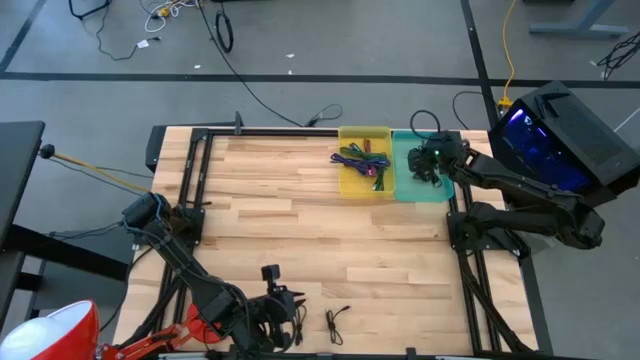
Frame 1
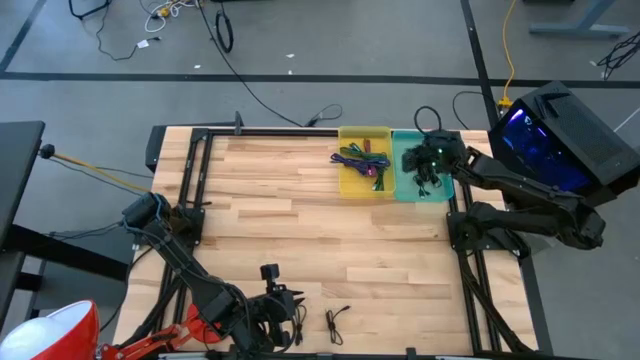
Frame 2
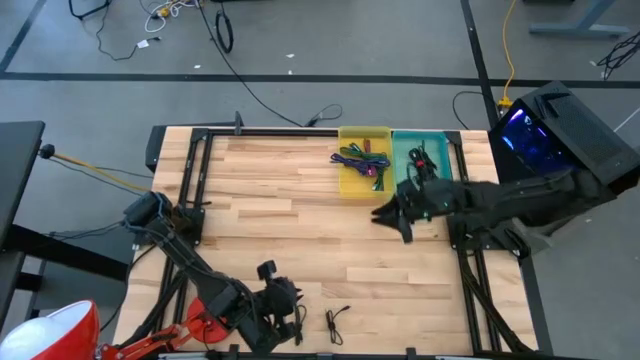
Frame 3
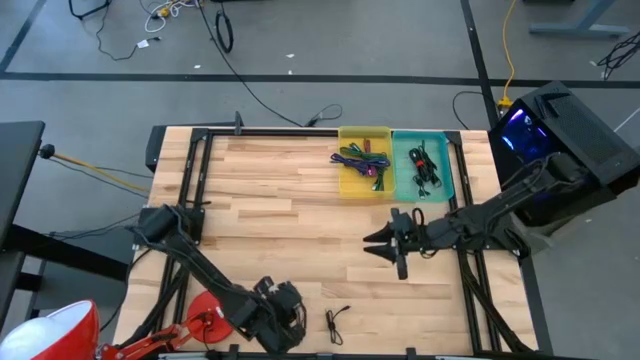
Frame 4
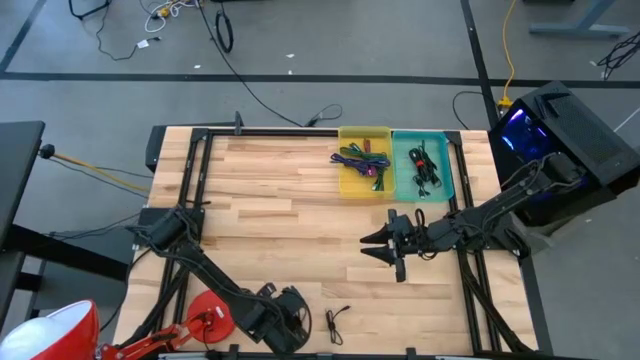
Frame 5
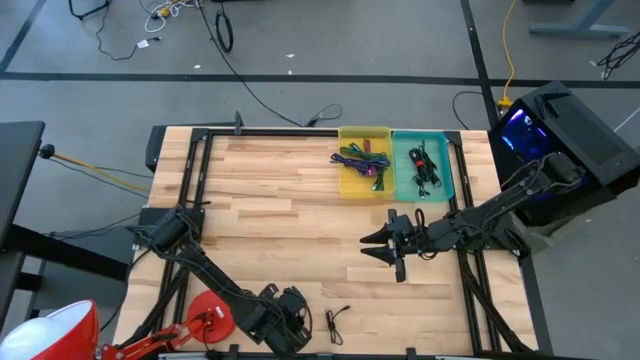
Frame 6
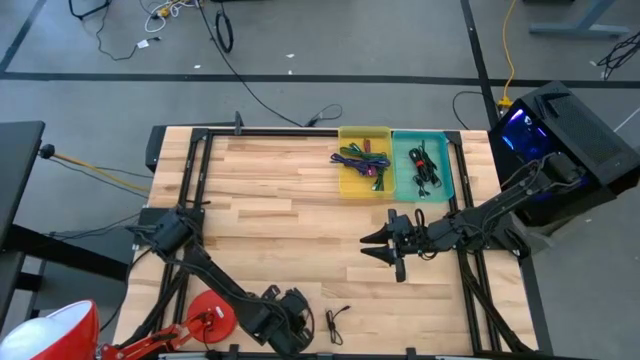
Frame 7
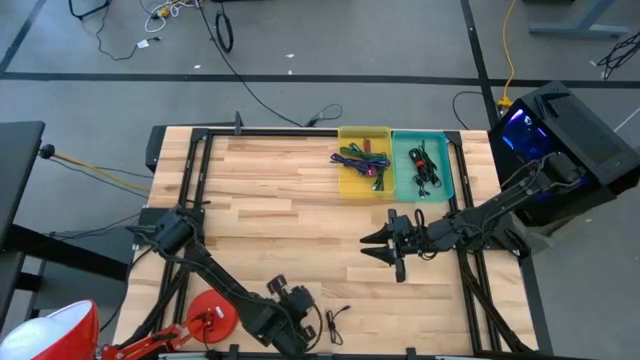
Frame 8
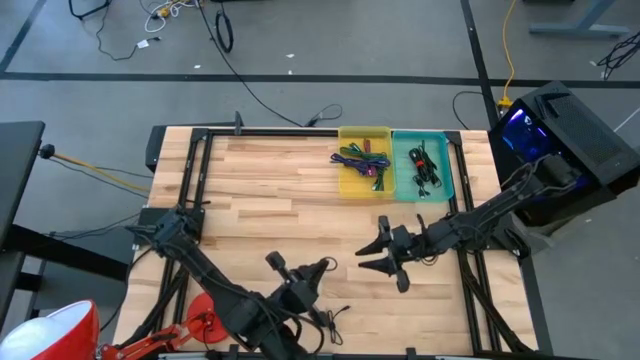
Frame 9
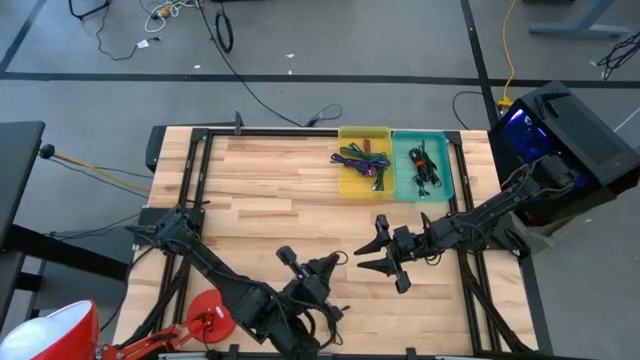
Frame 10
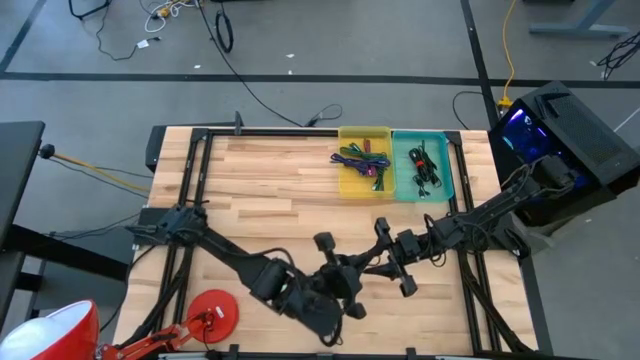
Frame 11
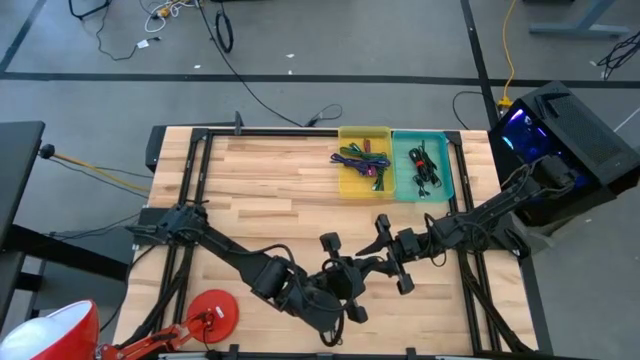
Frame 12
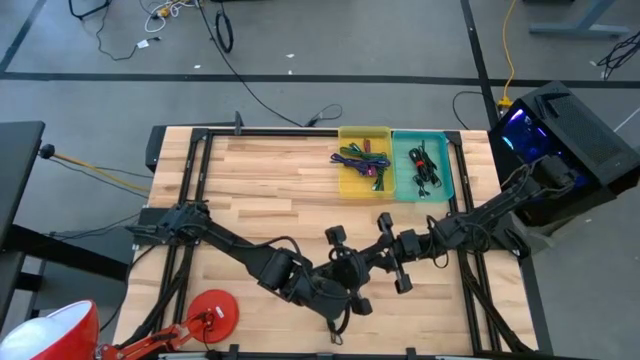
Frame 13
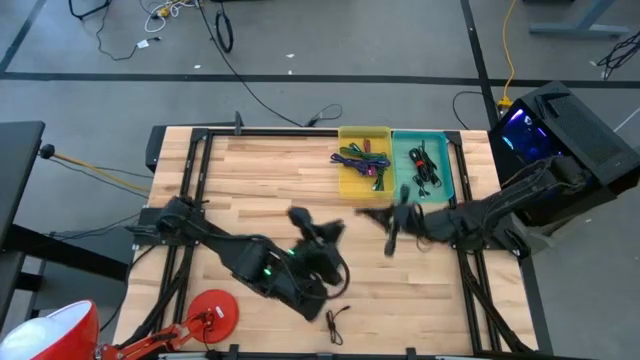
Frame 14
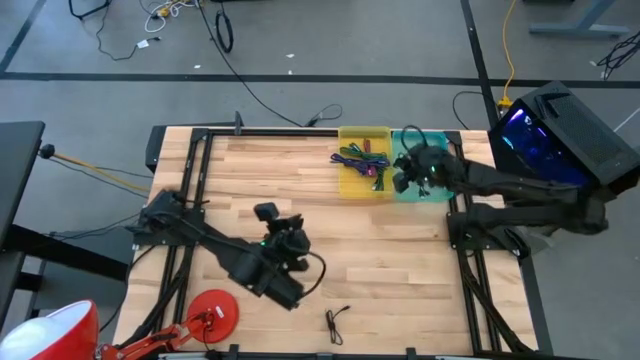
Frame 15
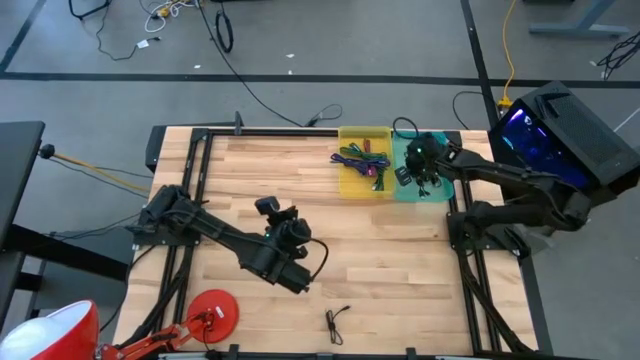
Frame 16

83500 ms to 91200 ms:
Task: Pick & Place USB Port
Put the black charger cable into the blue bin

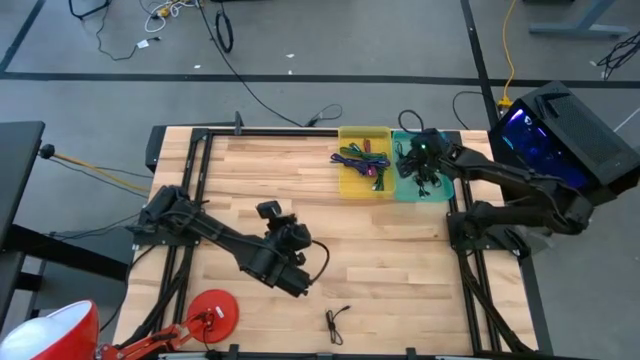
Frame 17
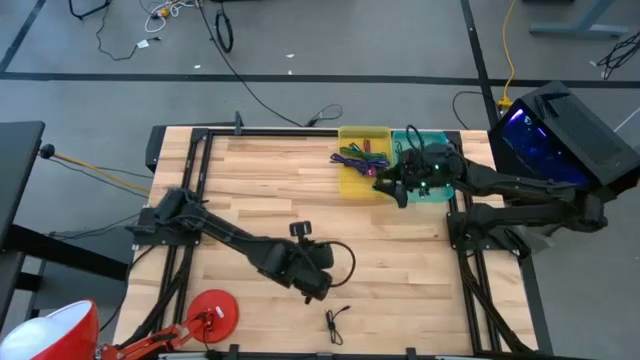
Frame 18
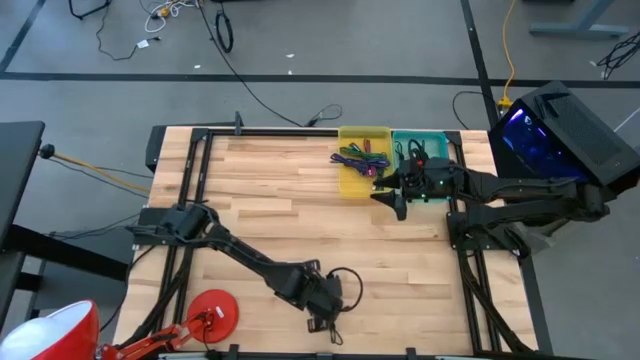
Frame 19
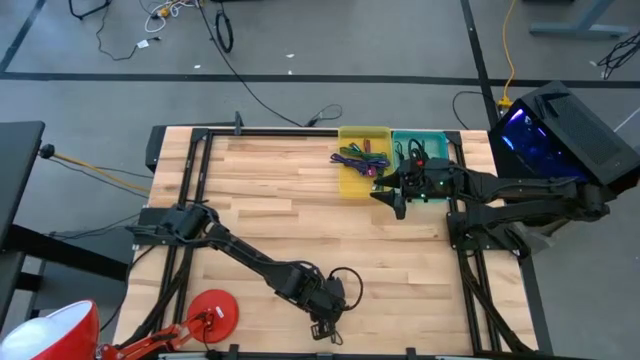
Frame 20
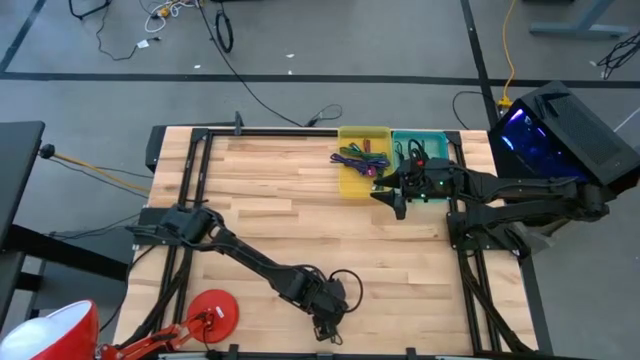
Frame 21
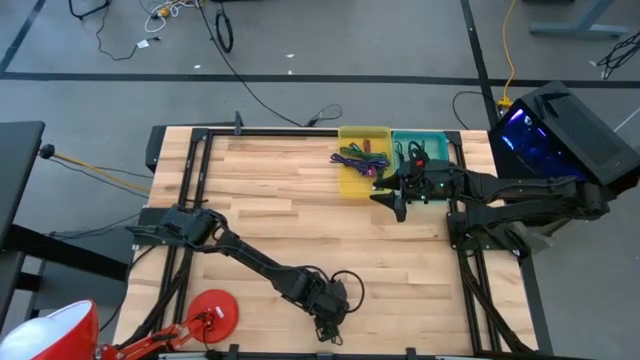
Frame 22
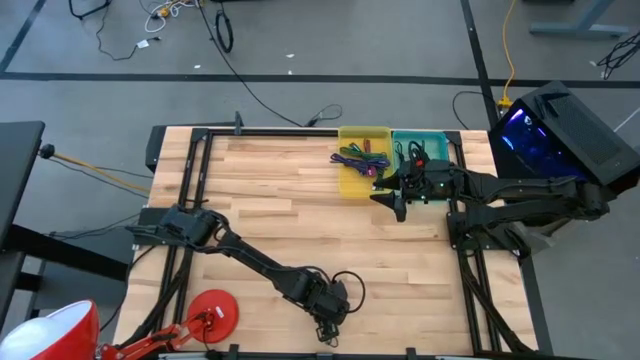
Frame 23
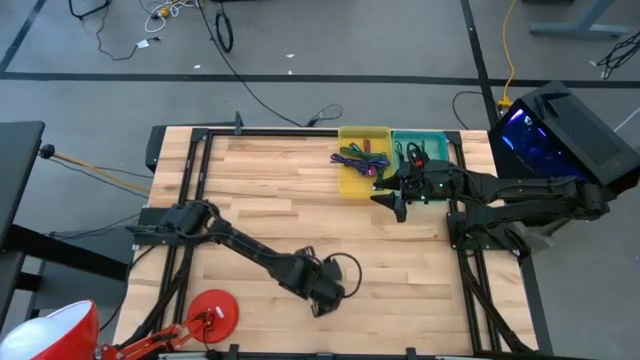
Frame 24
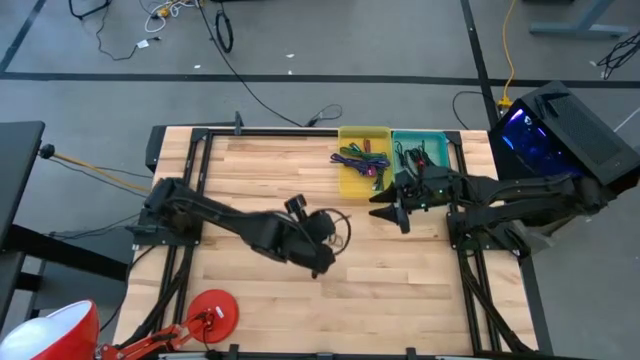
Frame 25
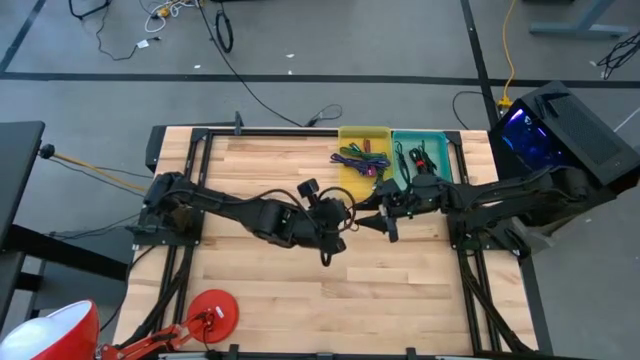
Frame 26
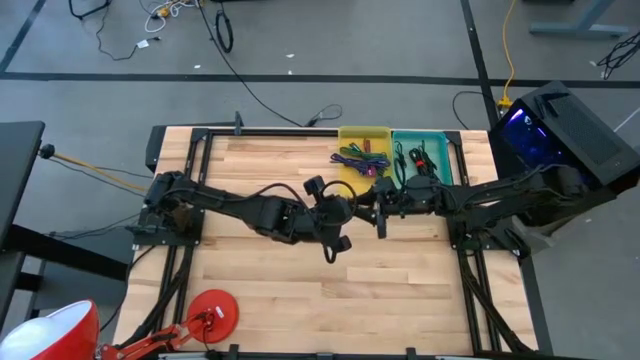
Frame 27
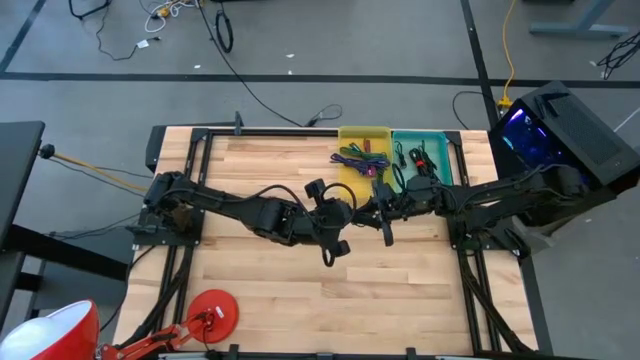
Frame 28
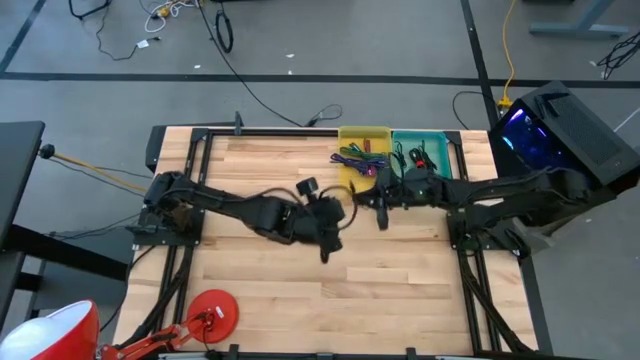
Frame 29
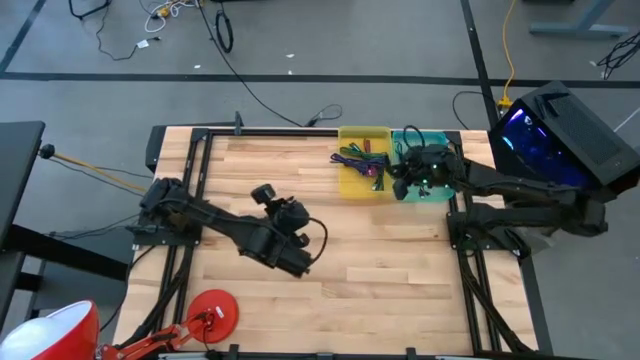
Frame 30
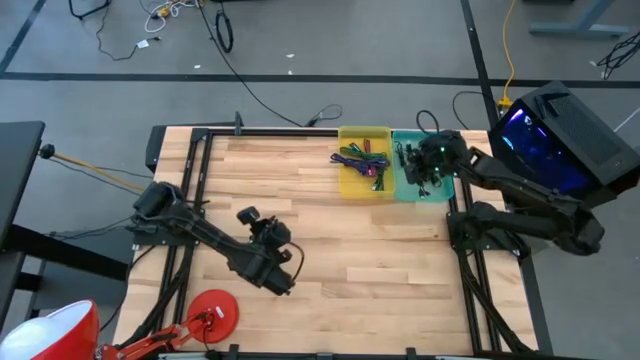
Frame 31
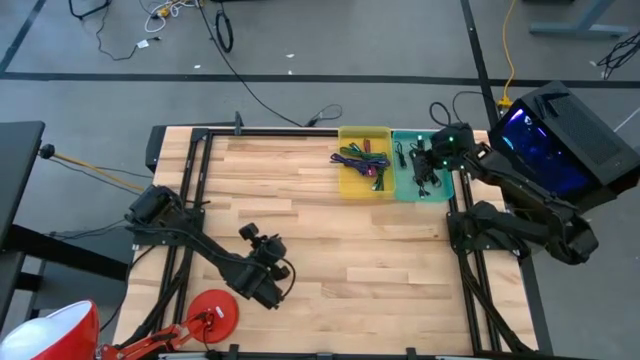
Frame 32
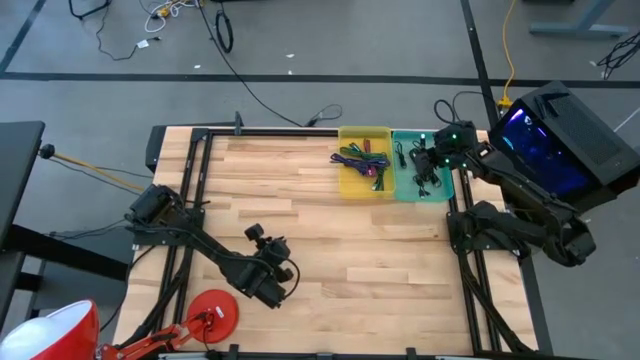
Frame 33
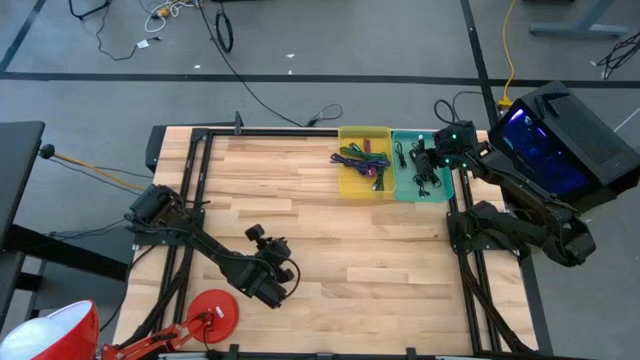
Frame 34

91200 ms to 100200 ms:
Put the black charger cable into the blue bin

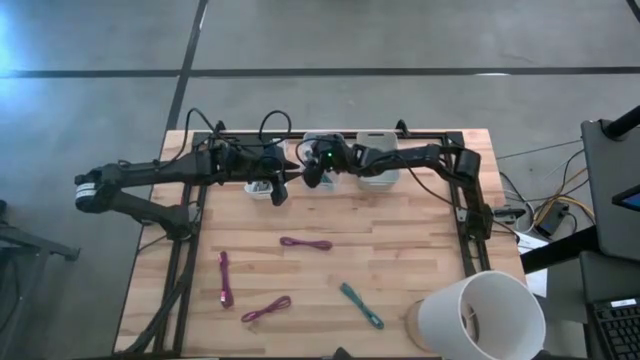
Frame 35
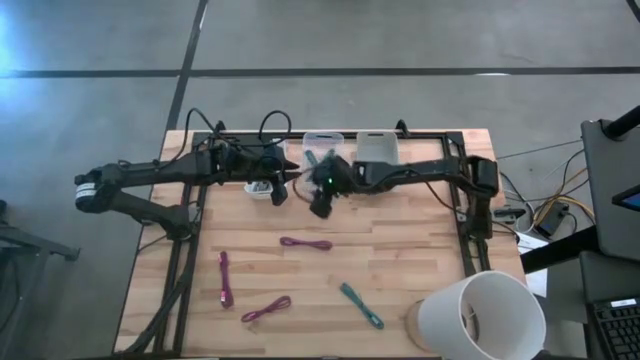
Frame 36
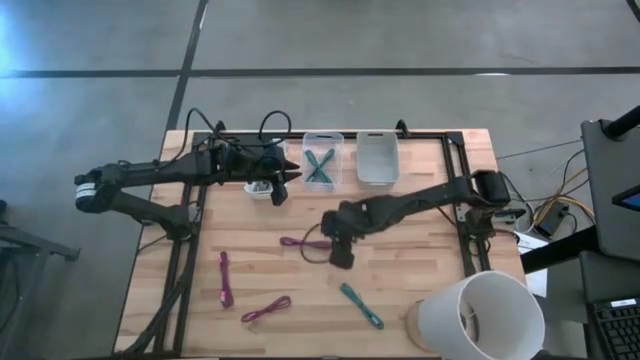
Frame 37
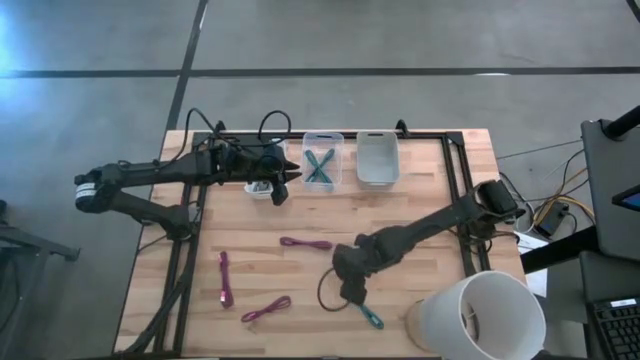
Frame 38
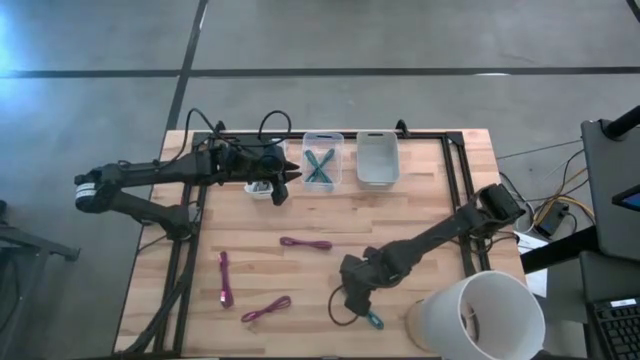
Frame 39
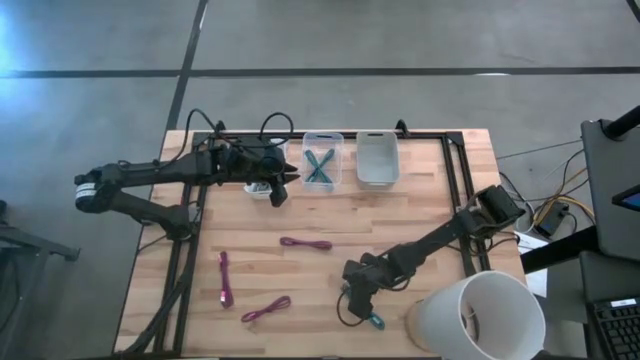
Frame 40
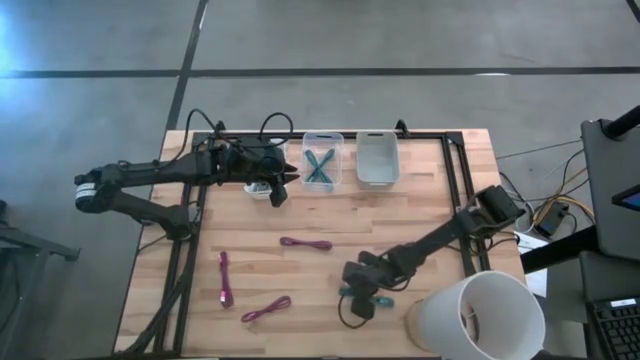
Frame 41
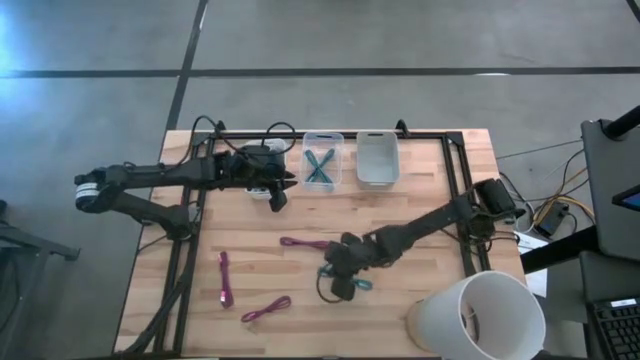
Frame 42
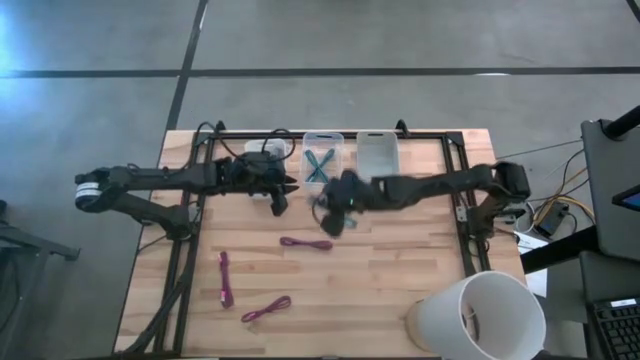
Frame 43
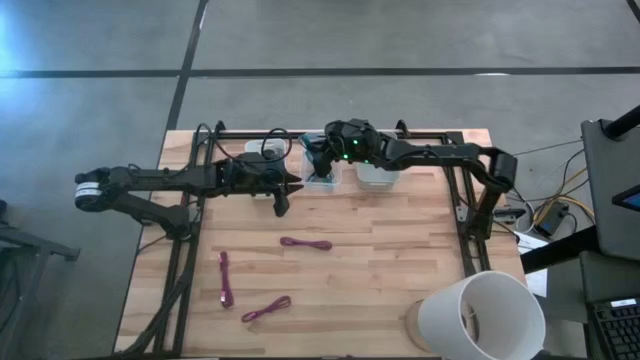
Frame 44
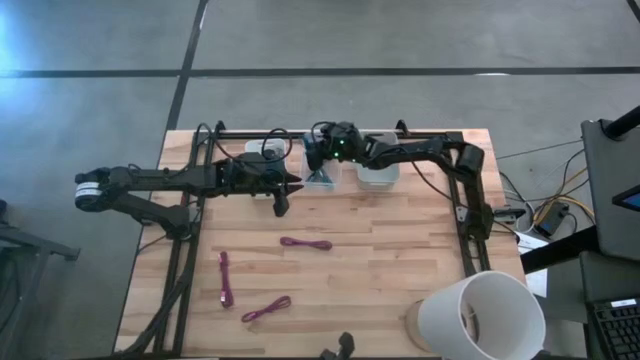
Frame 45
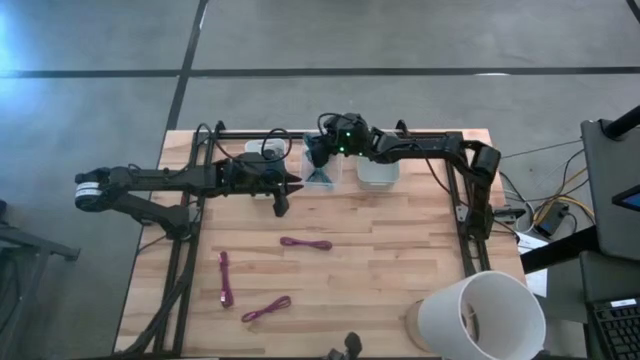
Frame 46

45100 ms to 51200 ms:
Task: Pick & Place USB Port
Put the blue charger cable into the transparent bin
